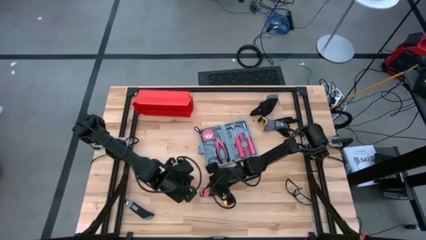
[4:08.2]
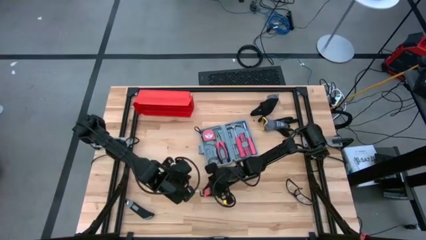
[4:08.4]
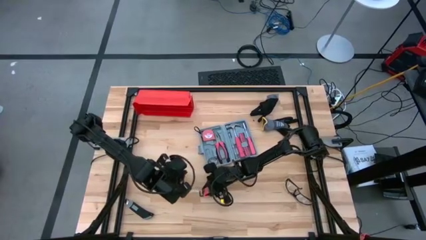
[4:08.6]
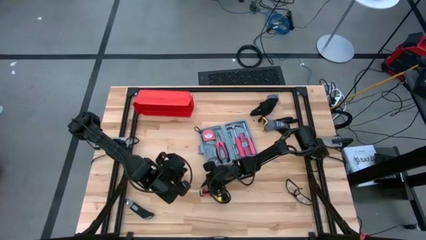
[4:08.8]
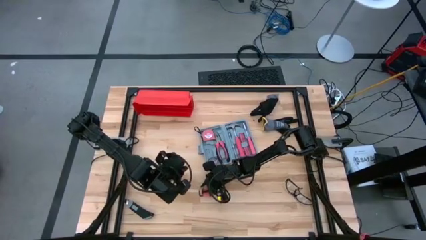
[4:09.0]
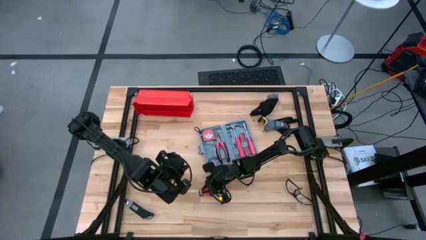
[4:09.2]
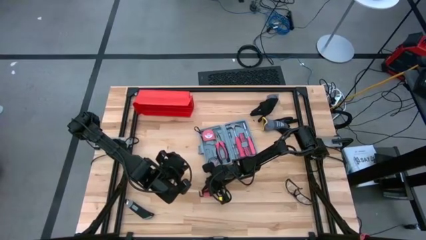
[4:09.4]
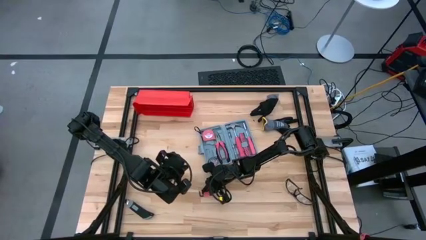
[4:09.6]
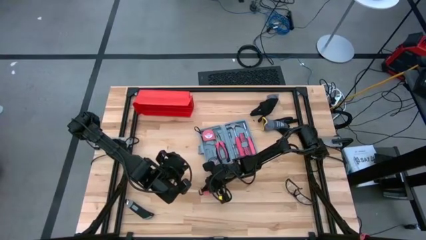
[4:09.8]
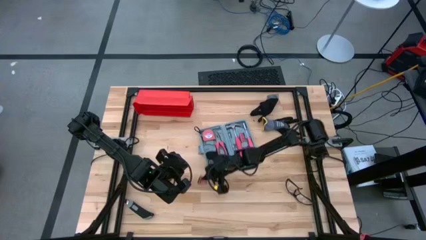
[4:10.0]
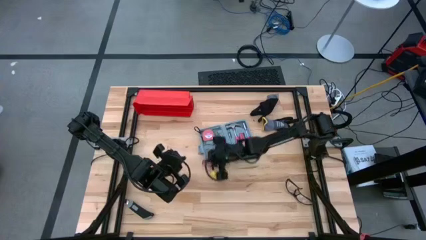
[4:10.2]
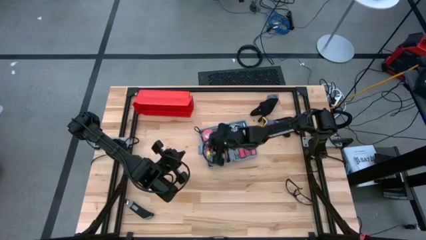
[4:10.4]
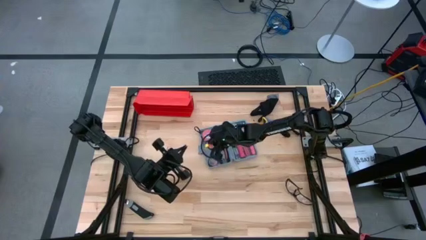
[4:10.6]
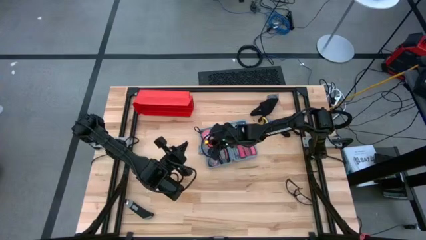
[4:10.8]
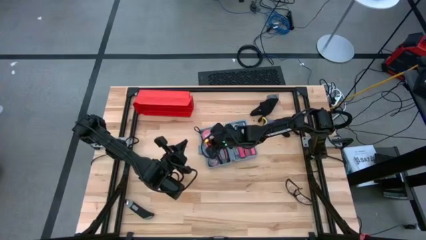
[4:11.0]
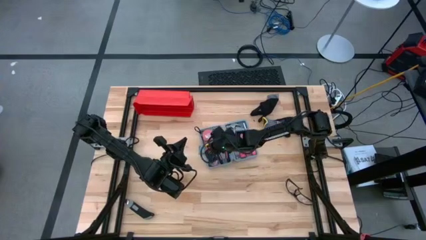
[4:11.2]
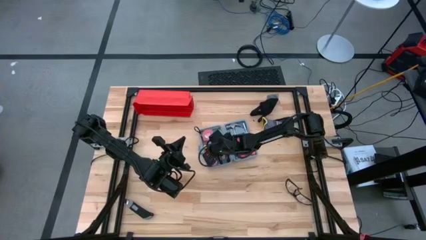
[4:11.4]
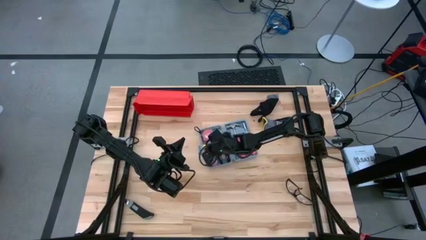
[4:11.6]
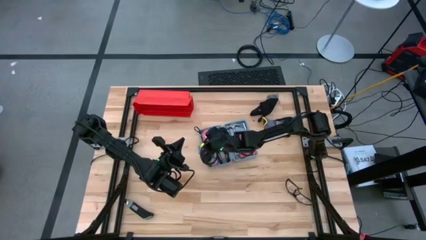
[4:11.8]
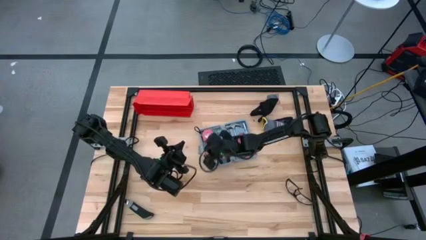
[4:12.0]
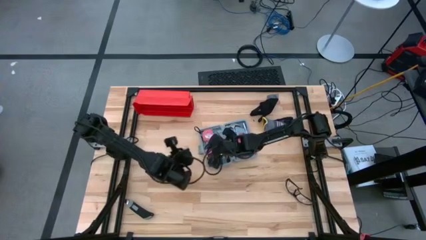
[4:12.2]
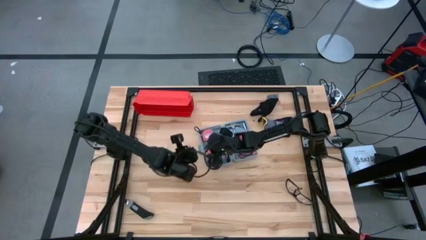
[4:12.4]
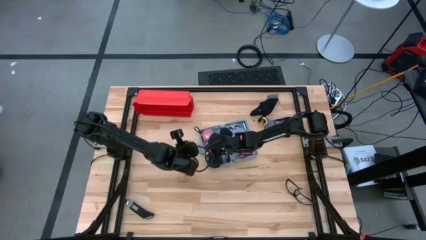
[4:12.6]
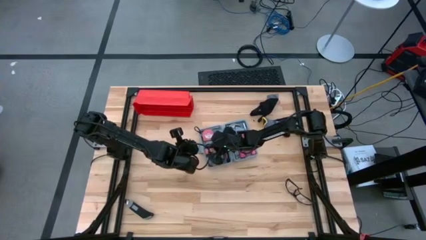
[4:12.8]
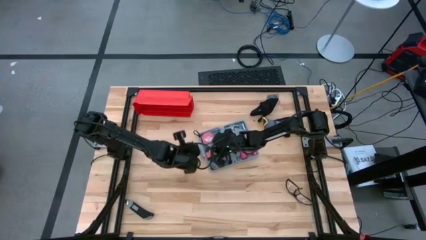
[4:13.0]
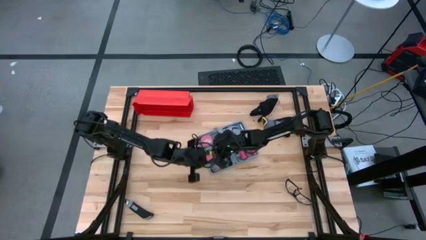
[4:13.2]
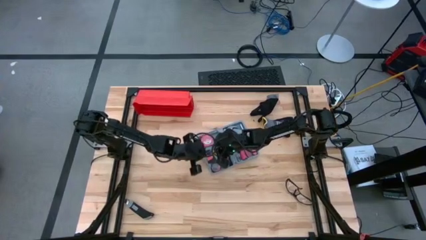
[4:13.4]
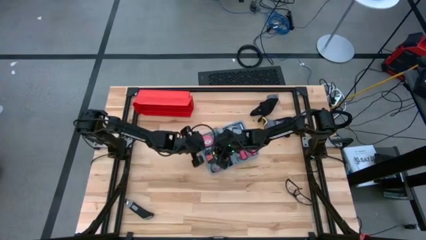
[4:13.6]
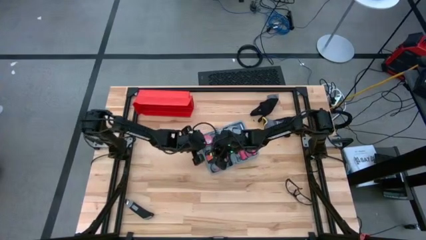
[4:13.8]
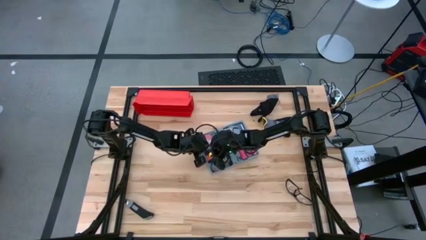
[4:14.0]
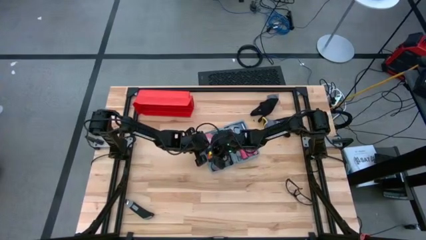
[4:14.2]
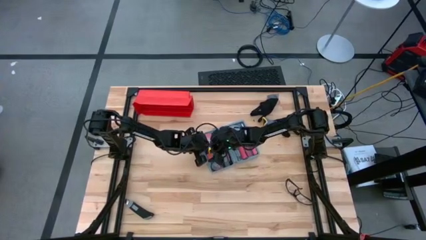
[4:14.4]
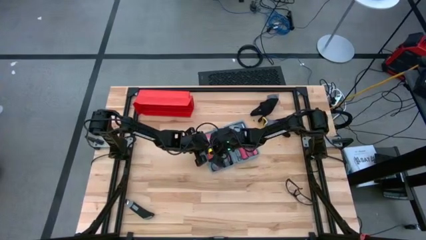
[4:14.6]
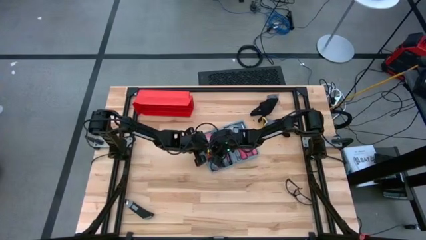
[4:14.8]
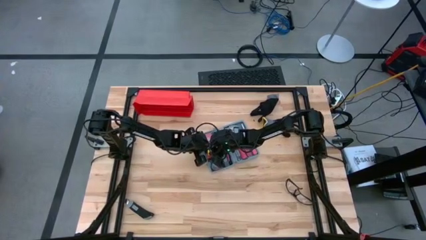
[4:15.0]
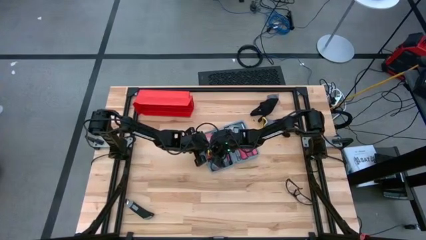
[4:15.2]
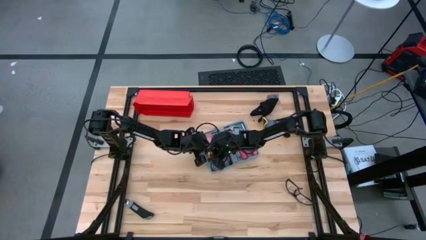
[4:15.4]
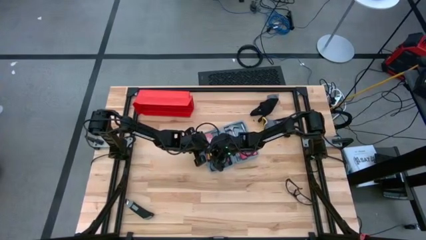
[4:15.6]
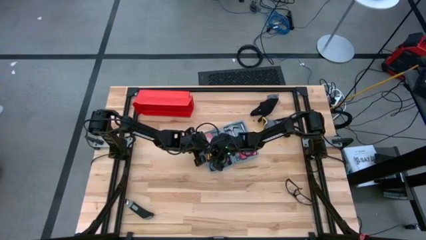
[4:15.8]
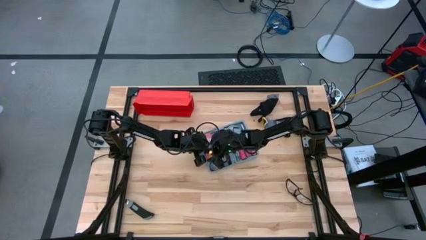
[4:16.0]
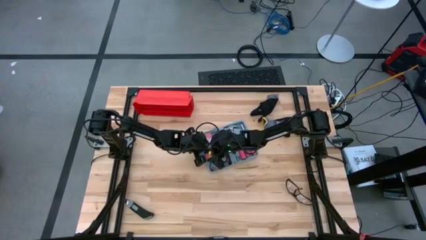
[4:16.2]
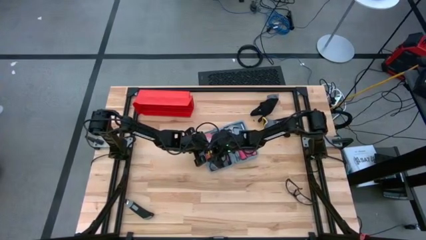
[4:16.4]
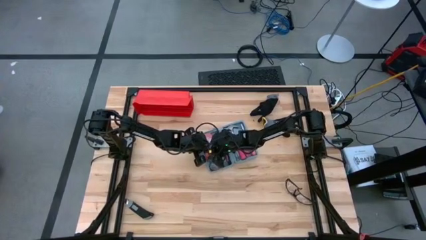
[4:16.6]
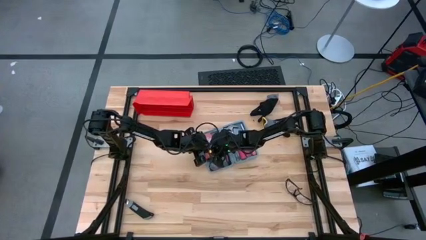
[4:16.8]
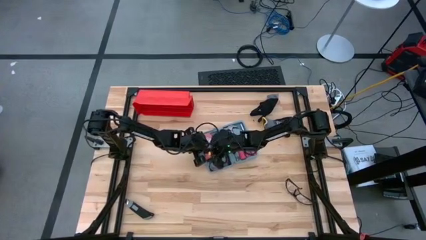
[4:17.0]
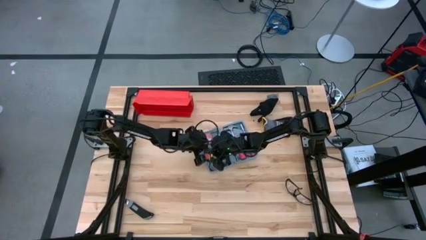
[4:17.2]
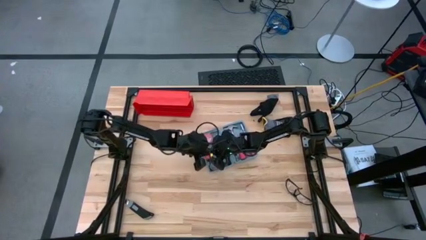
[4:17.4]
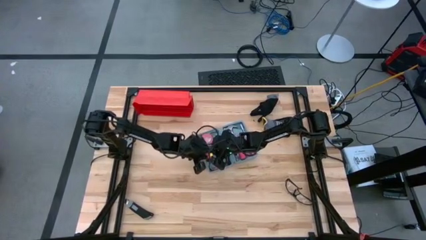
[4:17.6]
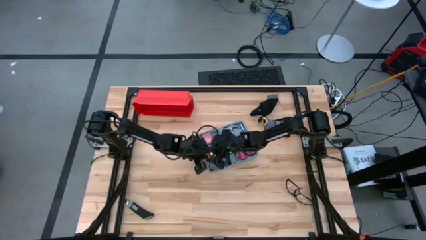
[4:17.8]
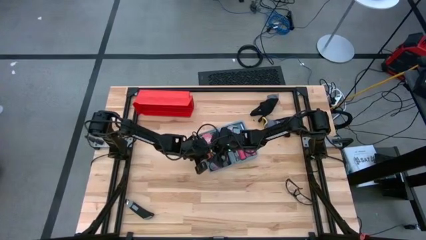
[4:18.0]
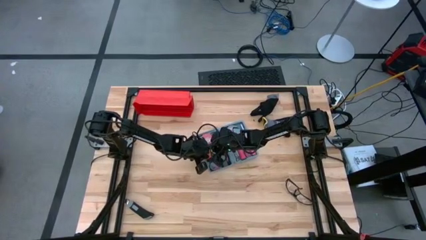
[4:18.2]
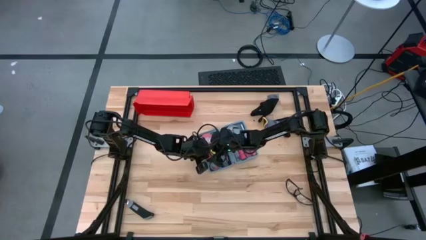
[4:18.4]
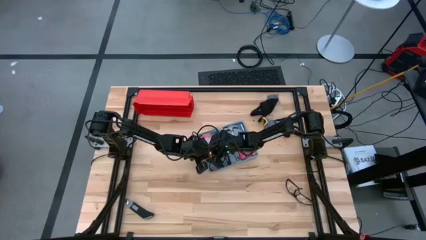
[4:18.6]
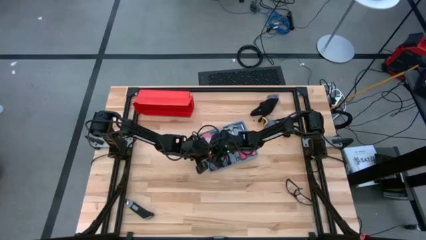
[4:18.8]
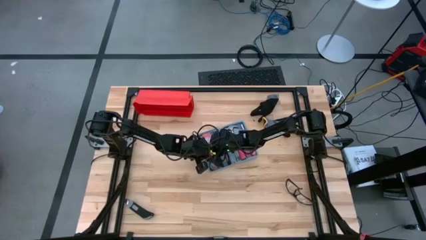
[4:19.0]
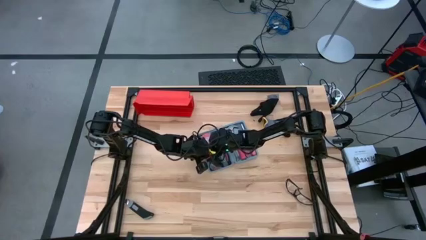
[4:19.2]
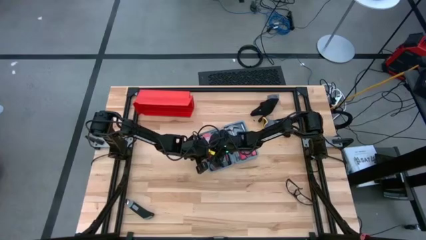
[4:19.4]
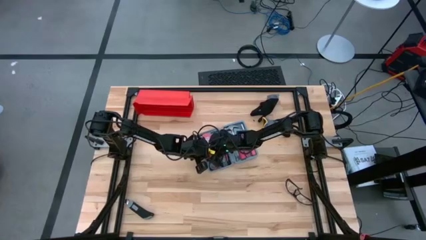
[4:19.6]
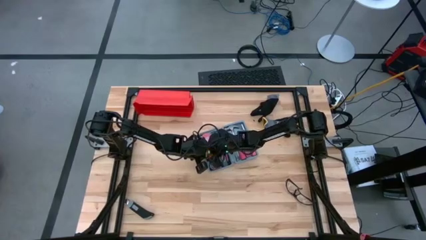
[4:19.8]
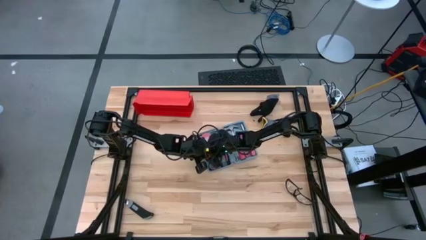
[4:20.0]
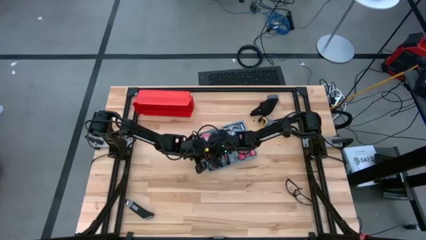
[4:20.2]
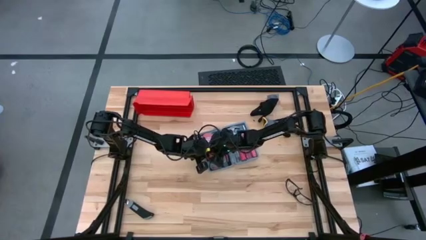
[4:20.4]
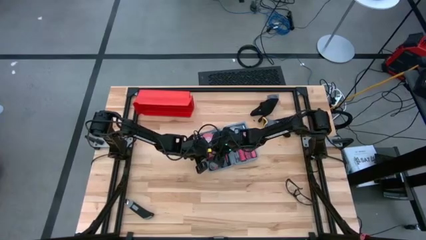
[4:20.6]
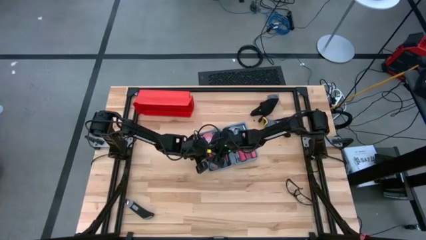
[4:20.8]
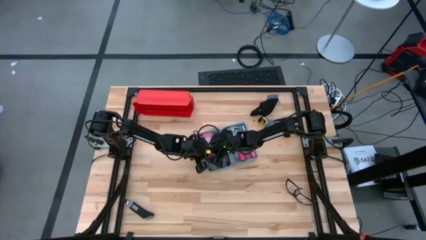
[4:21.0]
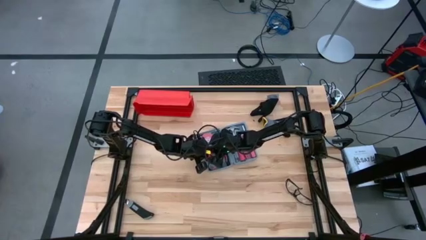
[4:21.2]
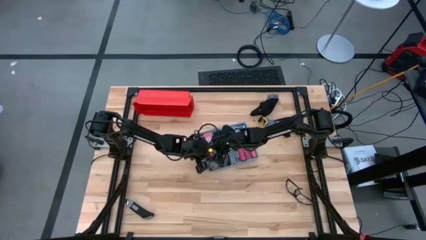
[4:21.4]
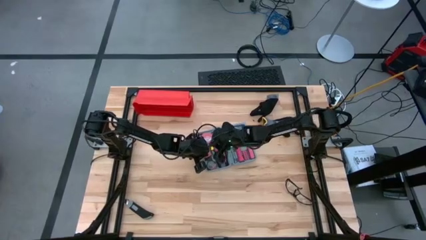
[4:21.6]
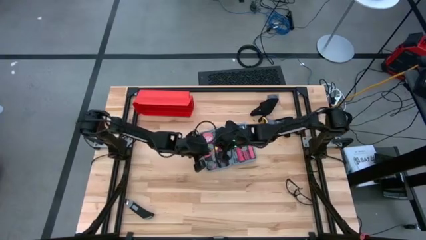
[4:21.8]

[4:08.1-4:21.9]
Task: prefit tool cases
Put the orange hex key set into the gray pre-fit tool case

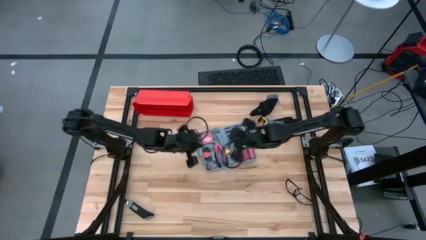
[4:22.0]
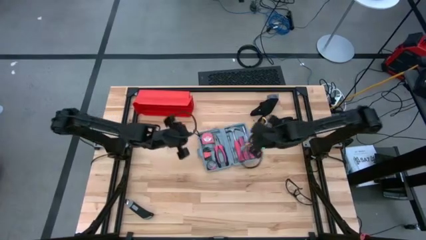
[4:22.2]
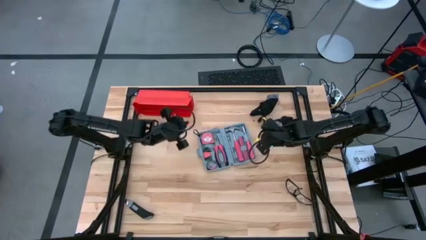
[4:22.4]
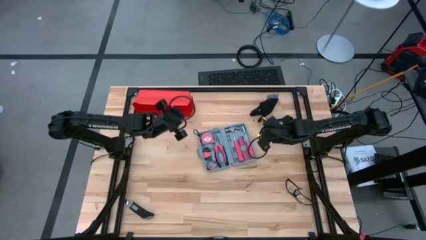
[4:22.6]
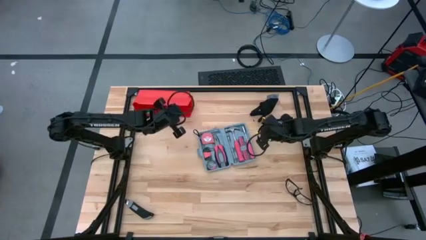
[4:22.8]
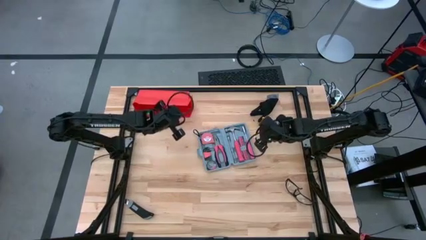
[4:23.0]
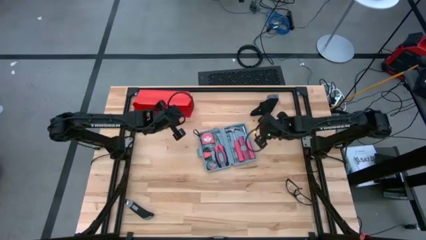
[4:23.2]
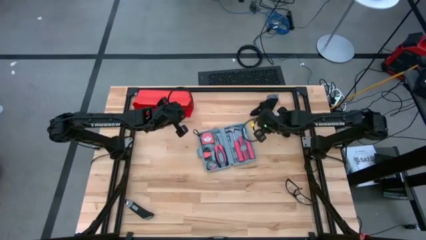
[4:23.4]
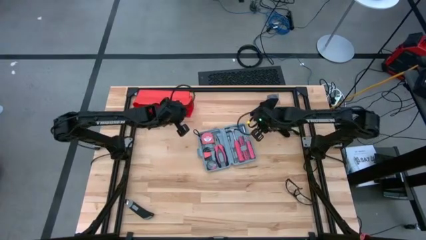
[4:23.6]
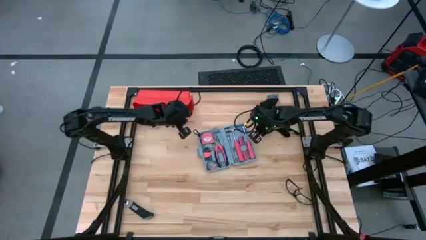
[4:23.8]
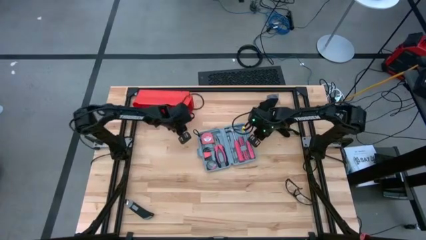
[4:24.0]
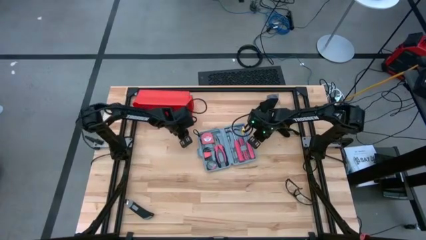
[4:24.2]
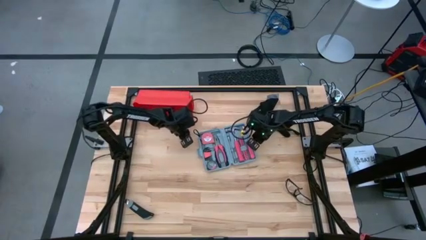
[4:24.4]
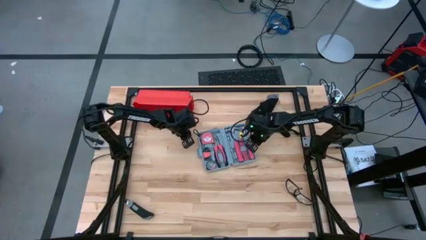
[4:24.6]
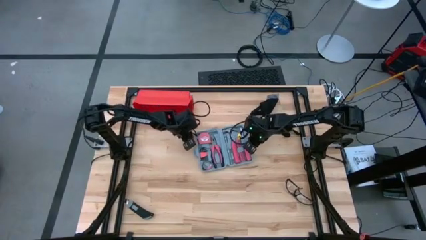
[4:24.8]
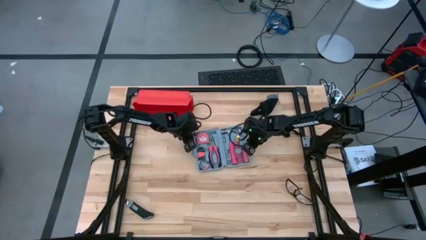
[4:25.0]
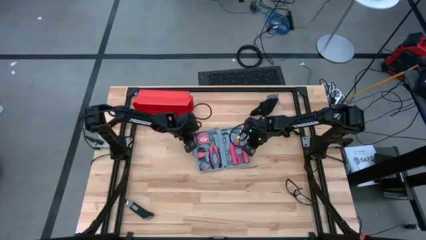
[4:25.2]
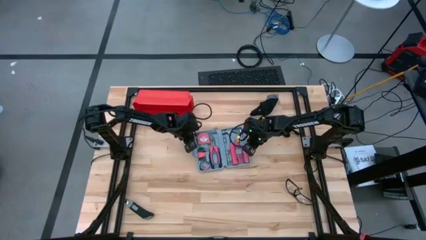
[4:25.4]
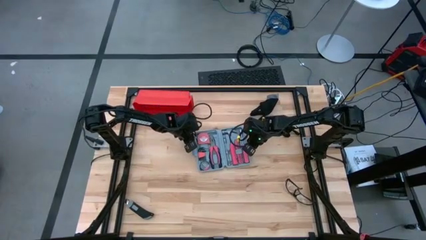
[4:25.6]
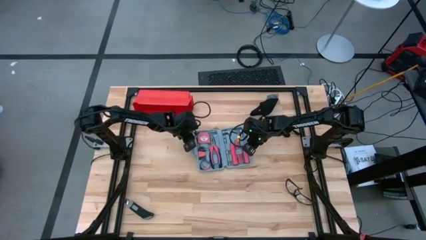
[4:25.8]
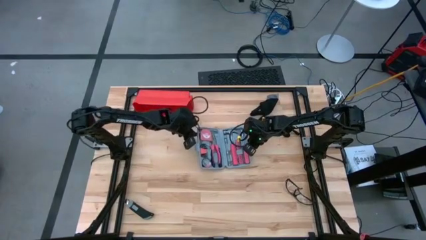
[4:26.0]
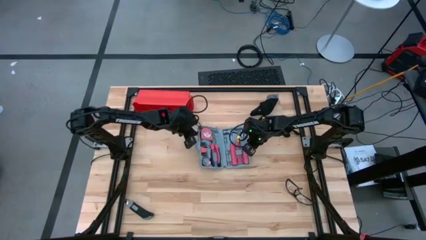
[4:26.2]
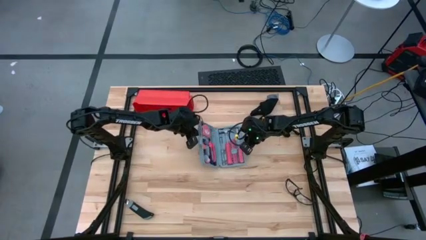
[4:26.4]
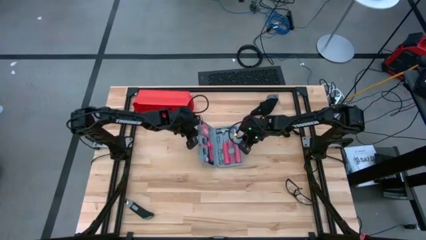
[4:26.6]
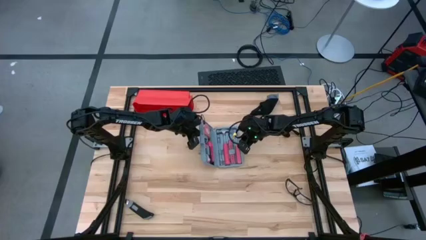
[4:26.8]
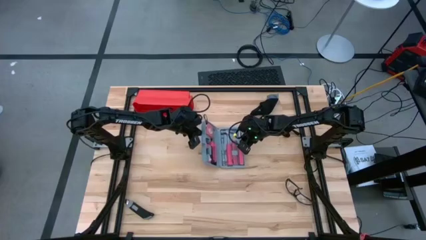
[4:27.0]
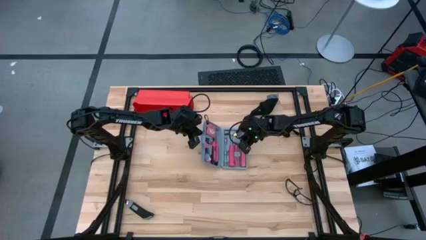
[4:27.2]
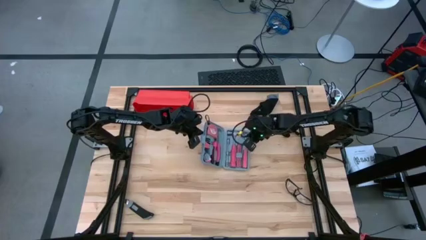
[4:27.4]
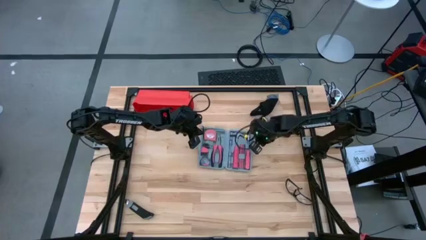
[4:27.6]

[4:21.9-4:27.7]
Close the gray pre-fit tool case
